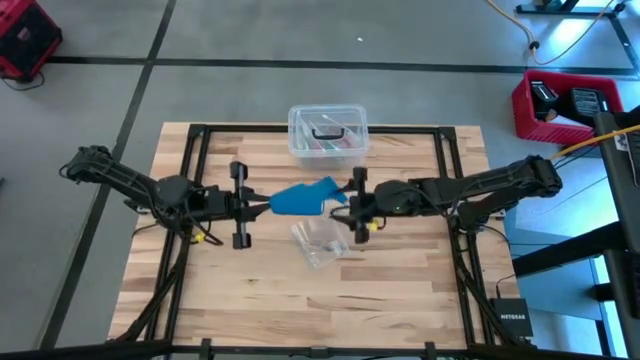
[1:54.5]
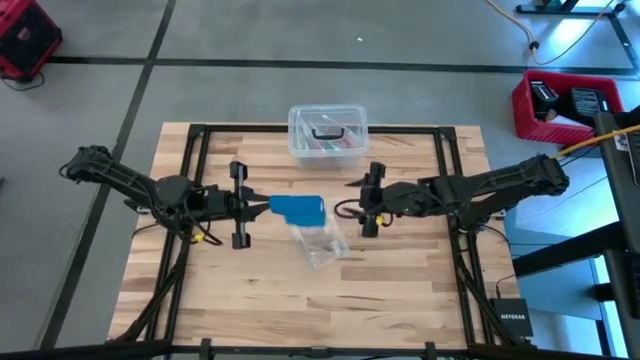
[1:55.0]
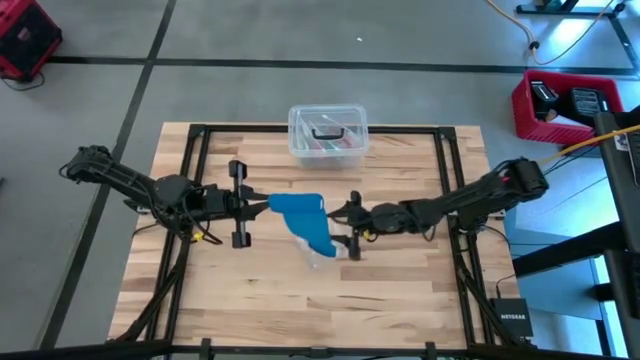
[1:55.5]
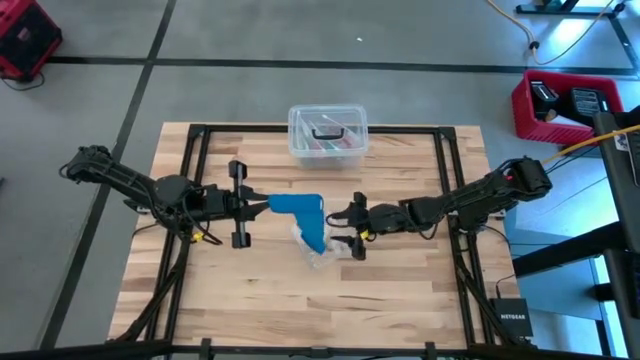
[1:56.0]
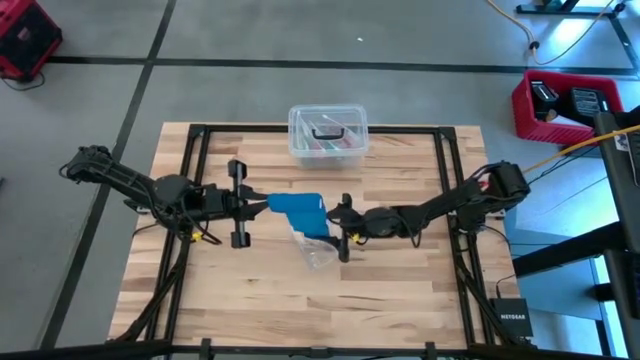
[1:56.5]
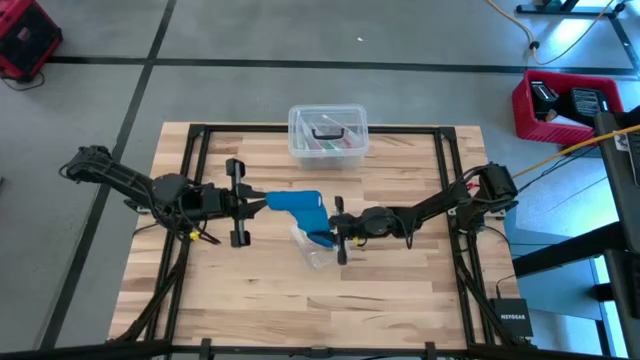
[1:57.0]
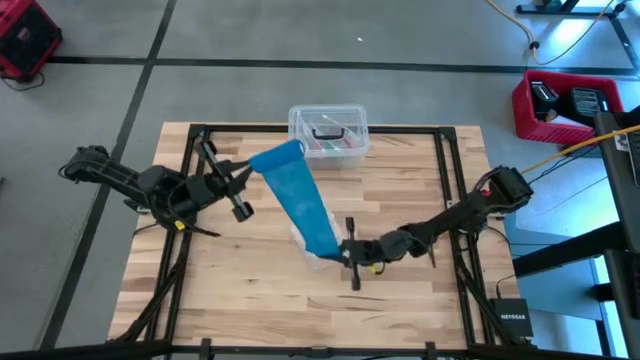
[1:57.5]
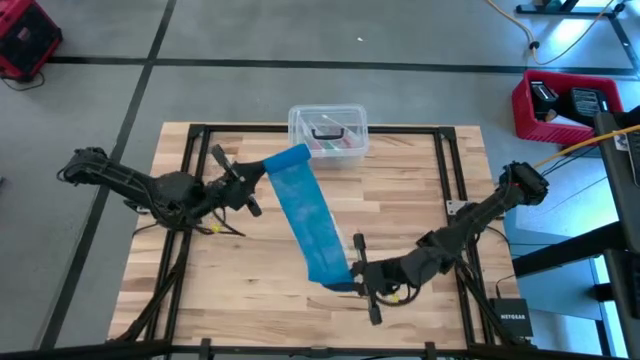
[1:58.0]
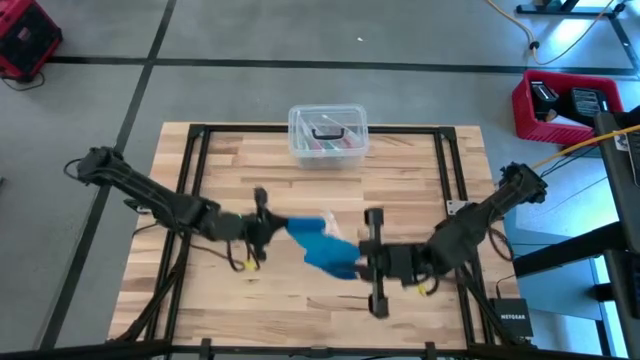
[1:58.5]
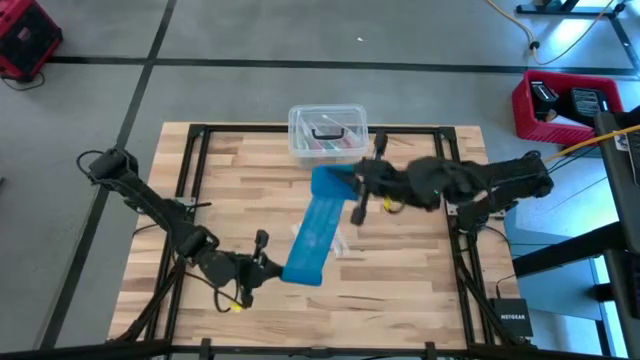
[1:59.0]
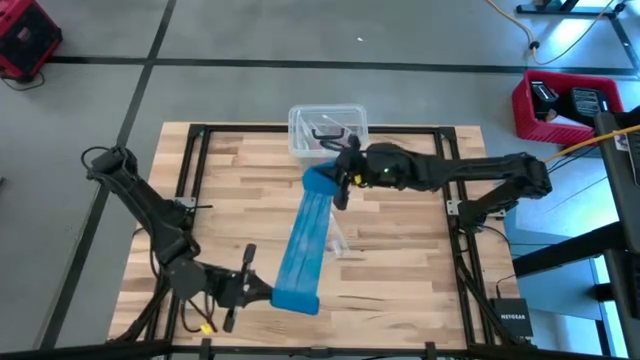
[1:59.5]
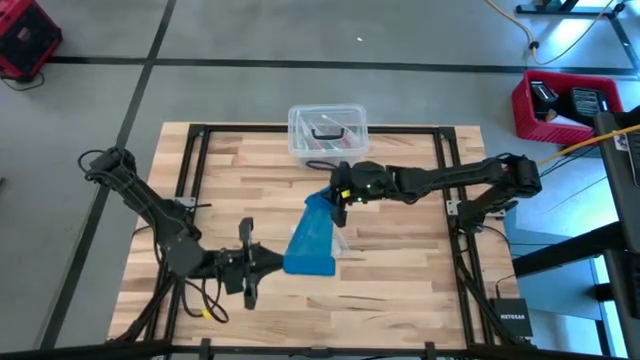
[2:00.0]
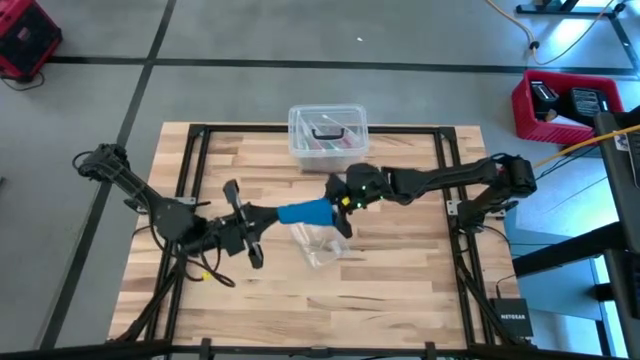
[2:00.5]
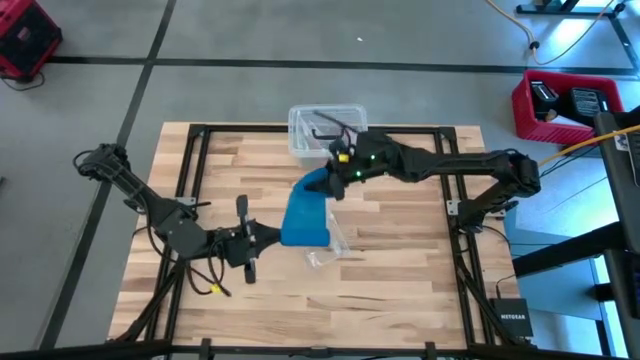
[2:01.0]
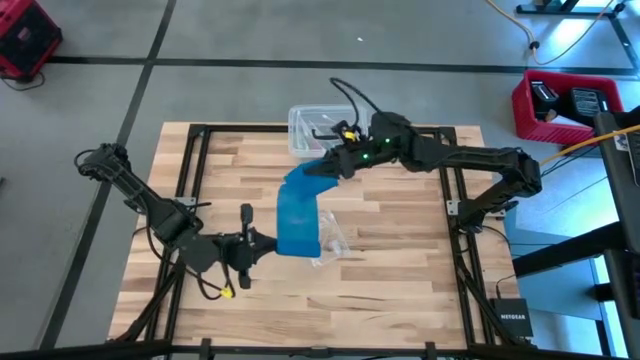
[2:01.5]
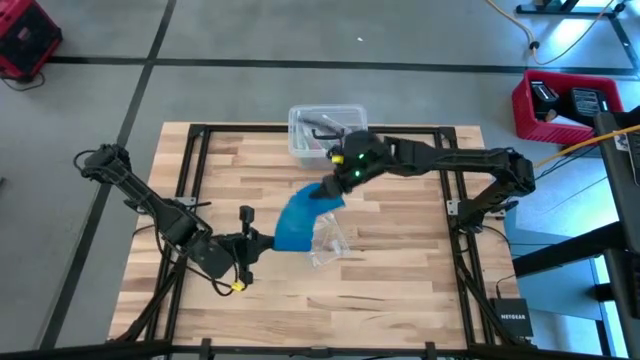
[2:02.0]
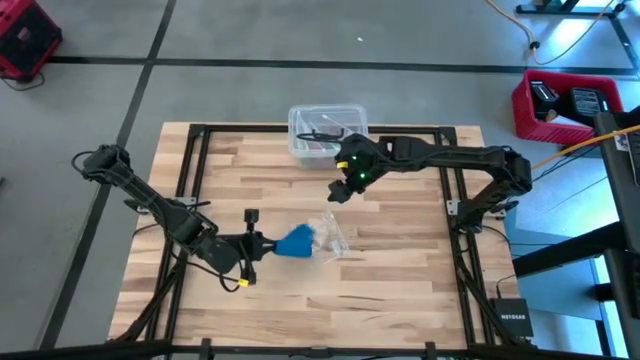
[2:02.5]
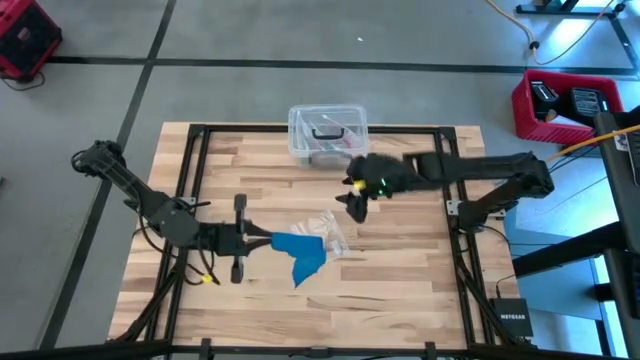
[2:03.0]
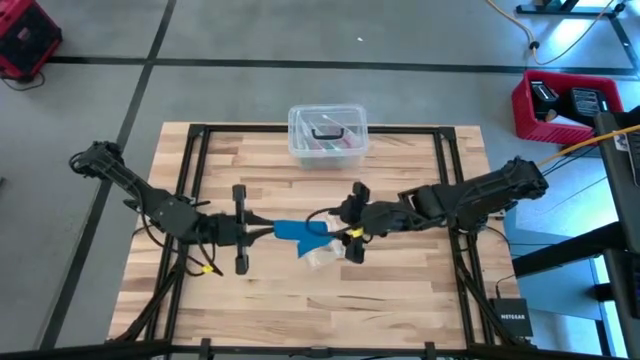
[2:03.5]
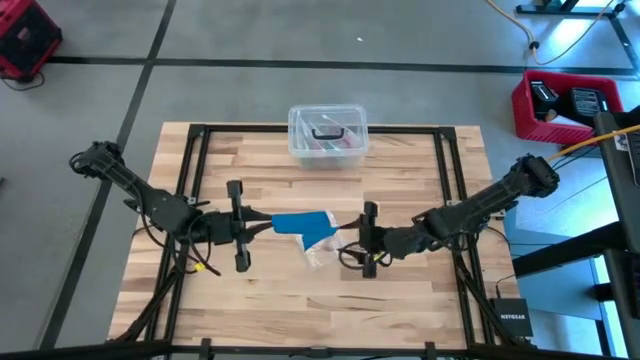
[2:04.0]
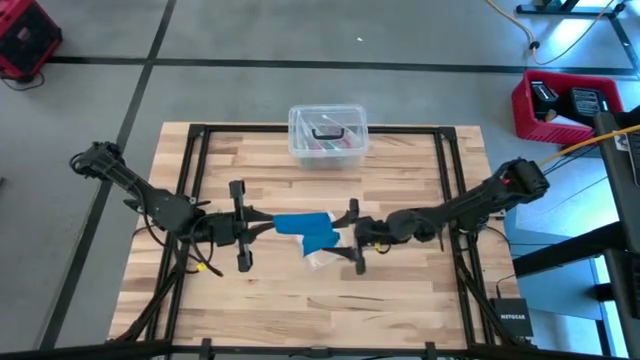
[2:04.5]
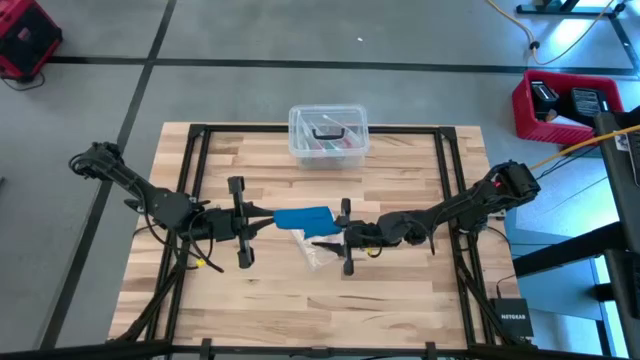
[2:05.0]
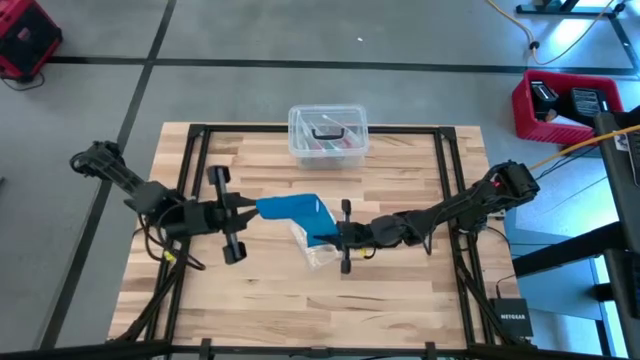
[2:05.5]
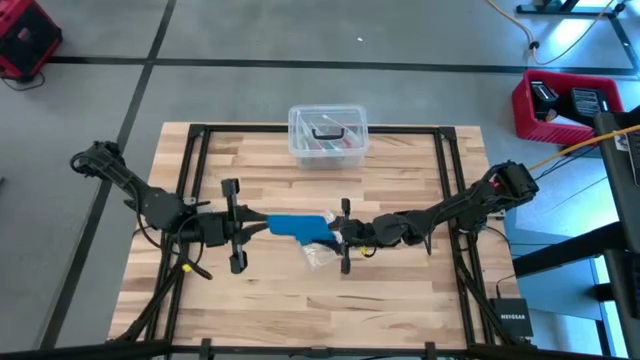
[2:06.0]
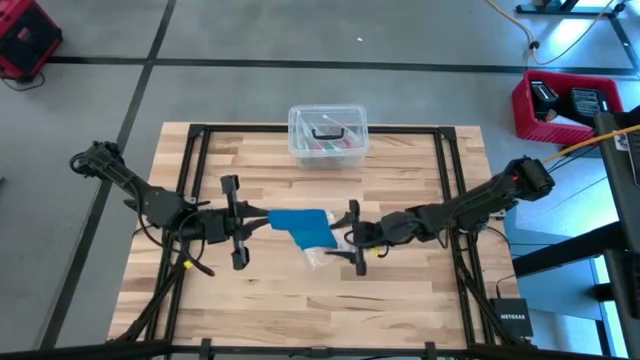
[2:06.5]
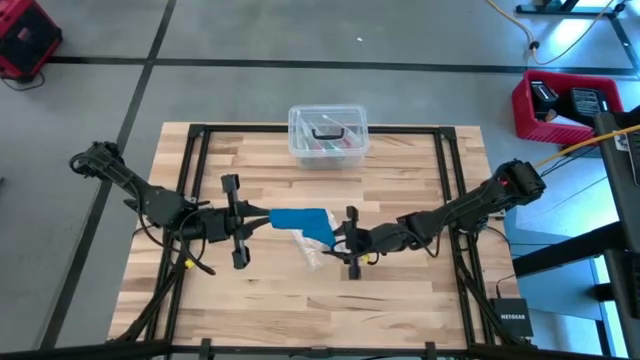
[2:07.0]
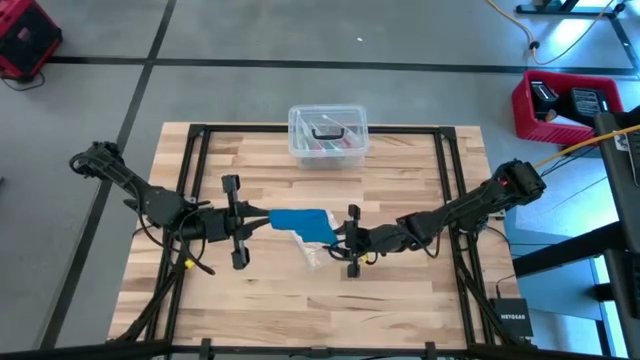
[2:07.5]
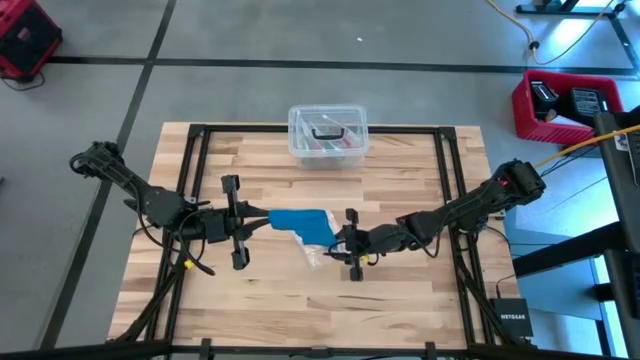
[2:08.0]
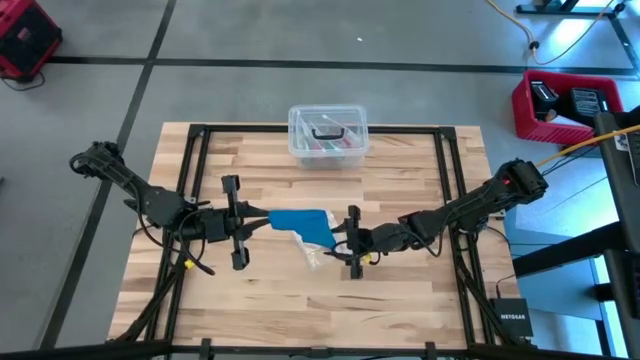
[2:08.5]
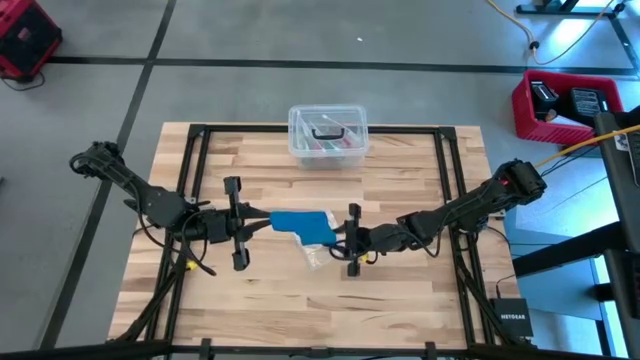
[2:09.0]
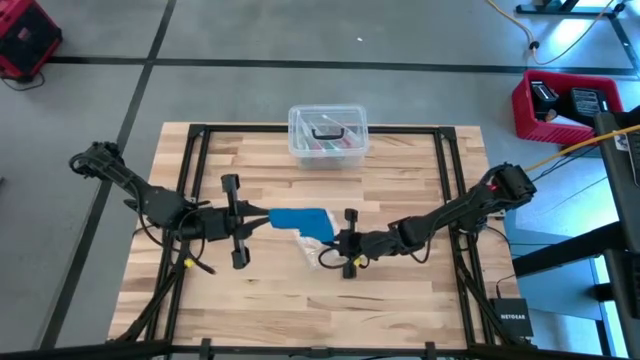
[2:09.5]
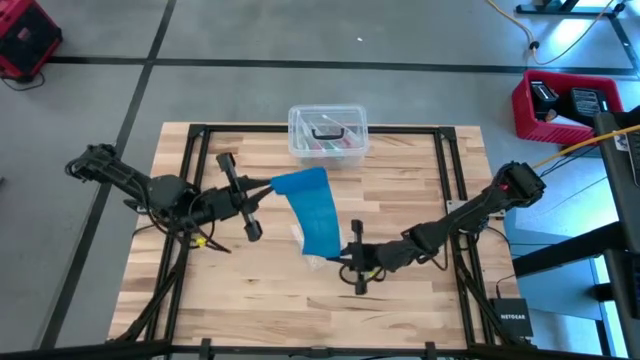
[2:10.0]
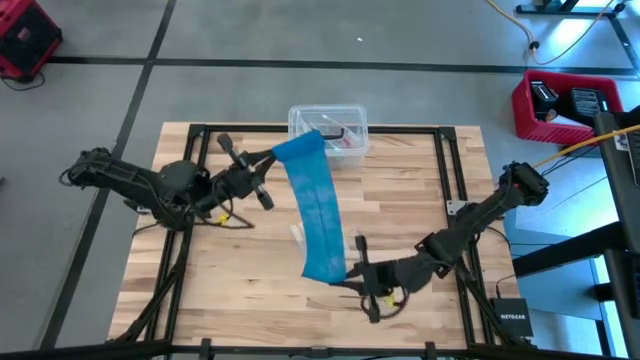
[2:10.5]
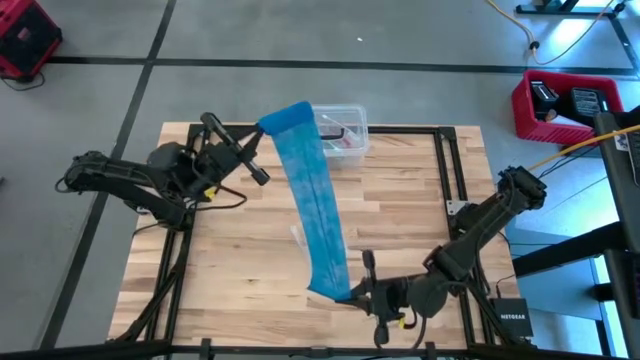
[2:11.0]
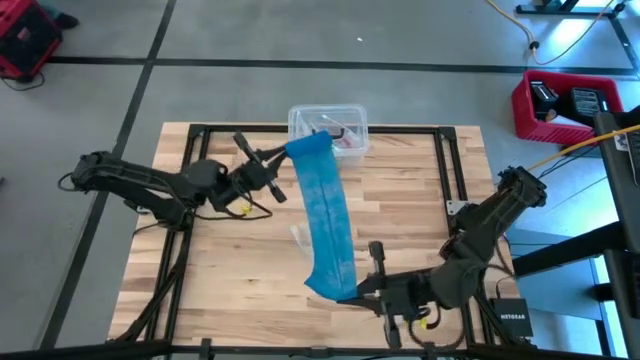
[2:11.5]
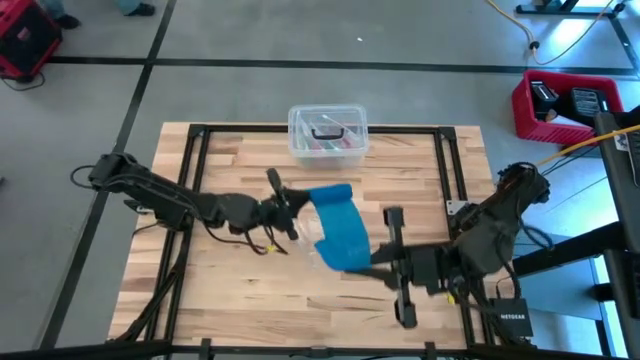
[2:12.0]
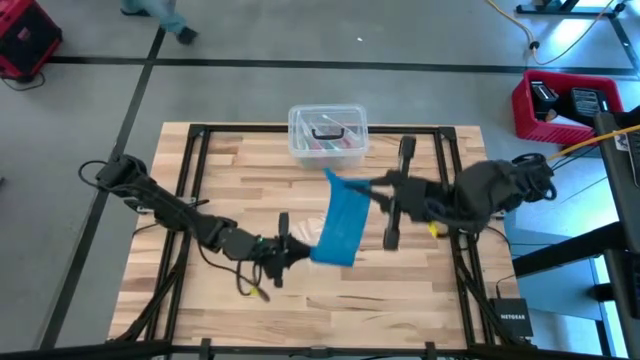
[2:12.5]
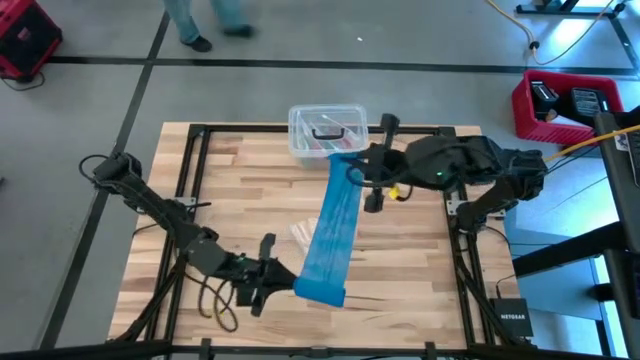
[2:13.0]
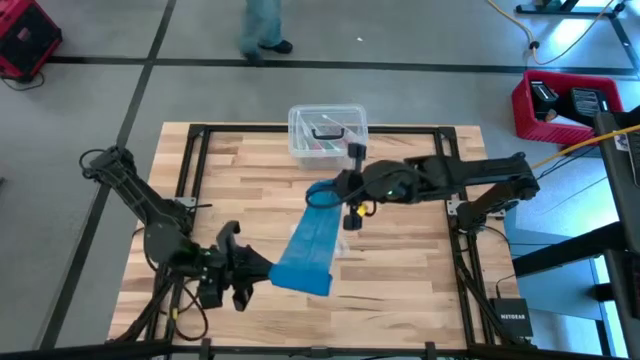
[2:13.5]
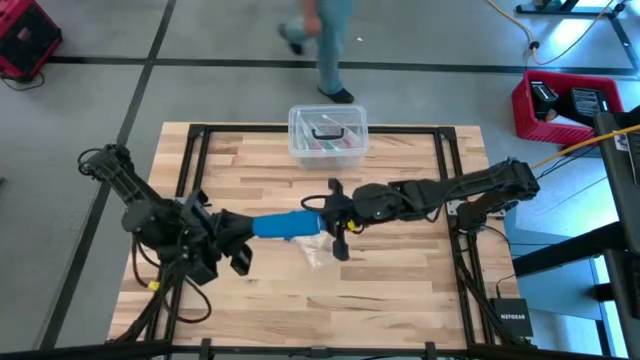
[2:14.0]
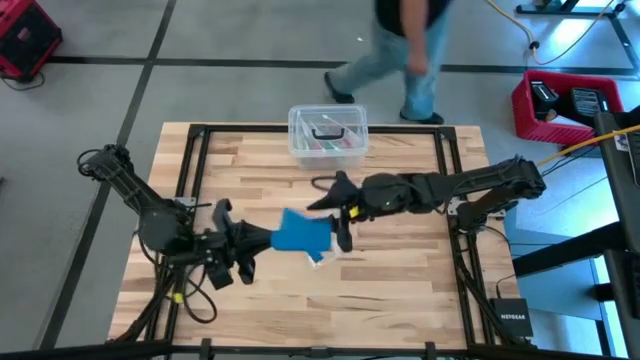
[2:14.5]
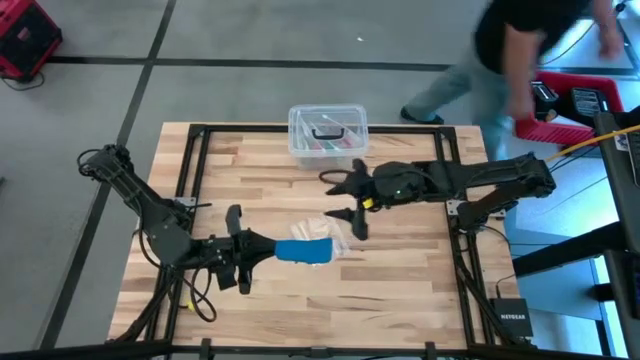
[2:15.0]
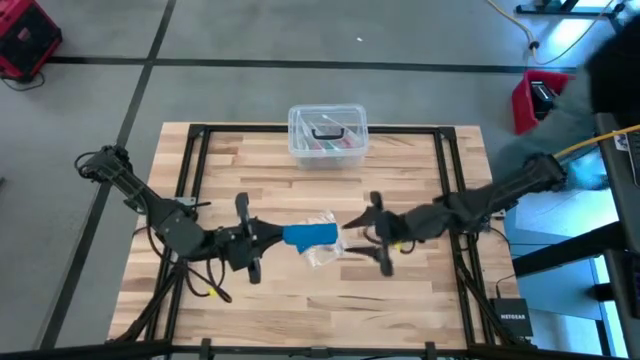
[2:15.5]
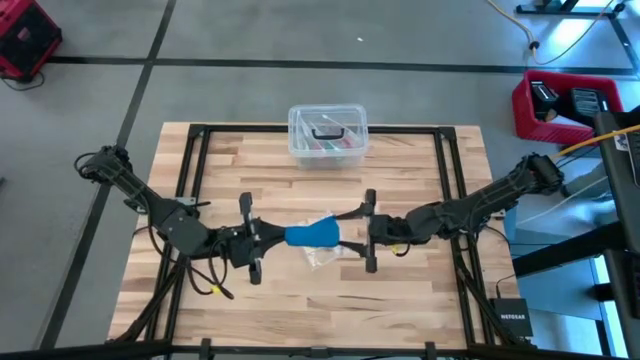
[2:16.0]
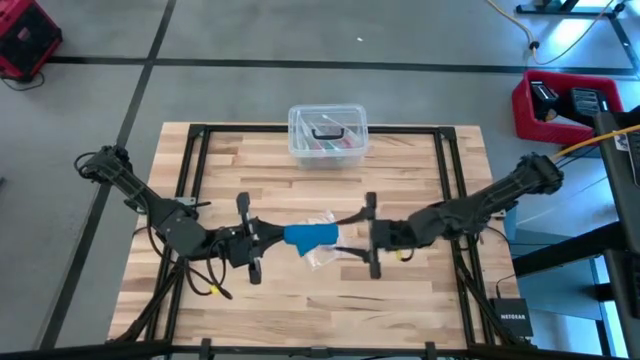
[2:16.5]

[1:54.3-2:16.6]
Task: Roll bandage
Roll the blue bandage
